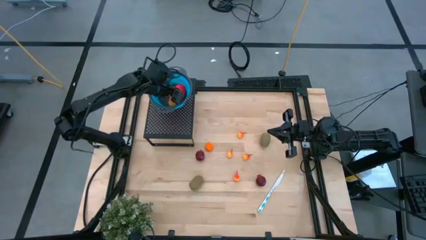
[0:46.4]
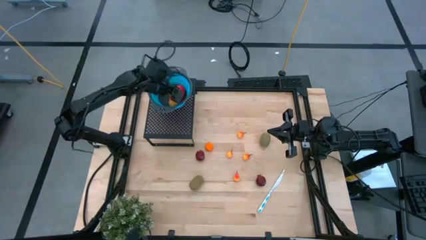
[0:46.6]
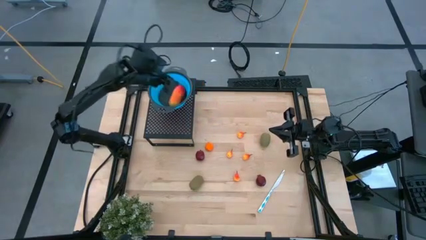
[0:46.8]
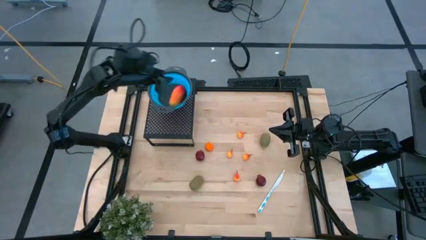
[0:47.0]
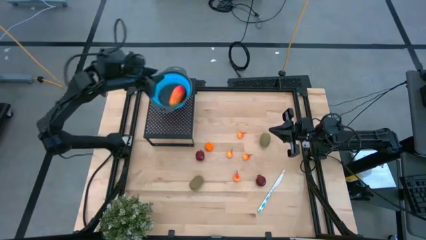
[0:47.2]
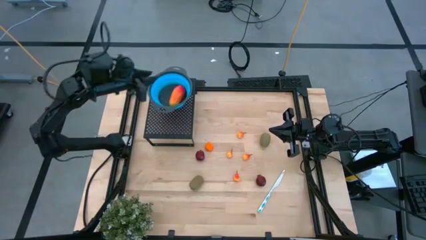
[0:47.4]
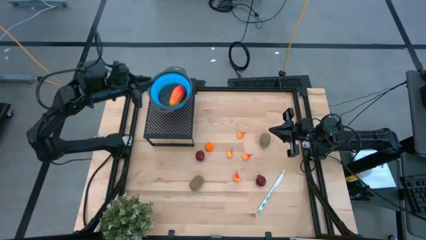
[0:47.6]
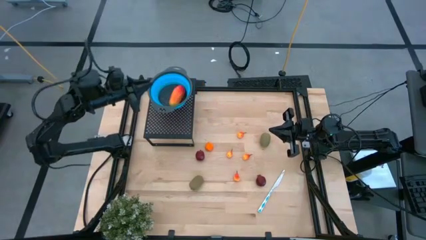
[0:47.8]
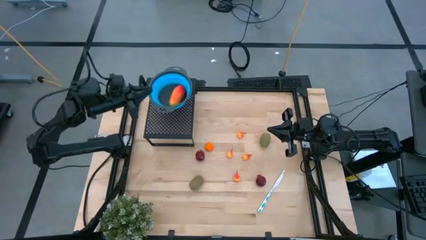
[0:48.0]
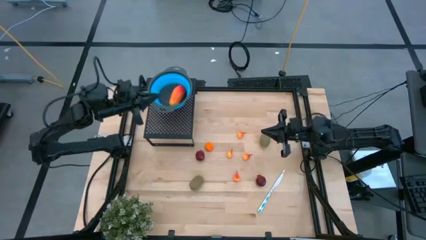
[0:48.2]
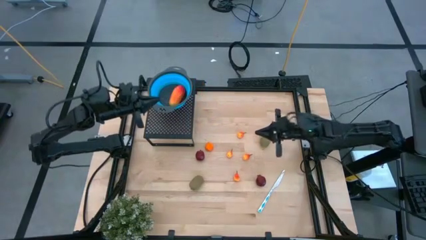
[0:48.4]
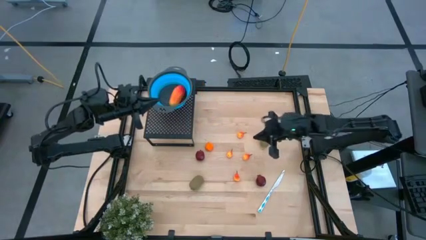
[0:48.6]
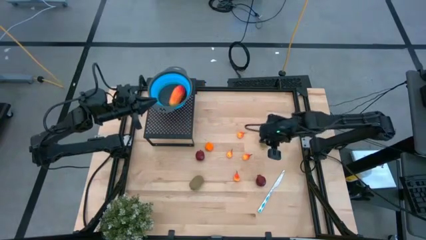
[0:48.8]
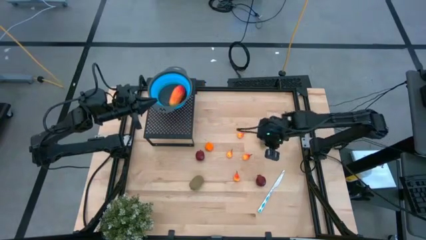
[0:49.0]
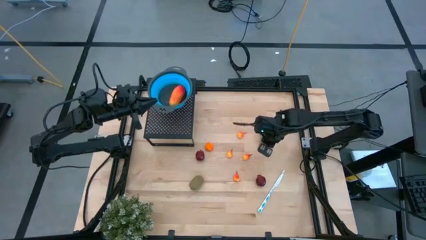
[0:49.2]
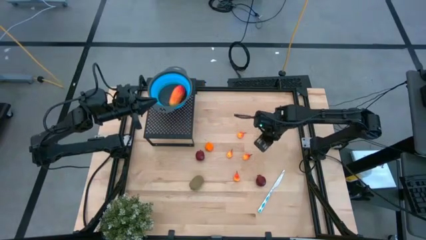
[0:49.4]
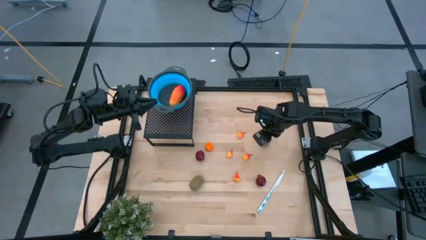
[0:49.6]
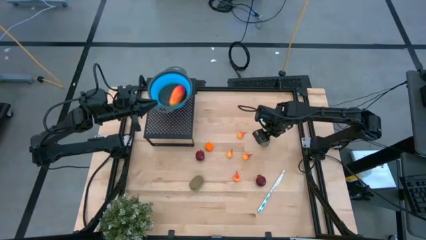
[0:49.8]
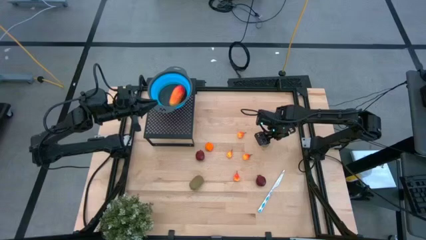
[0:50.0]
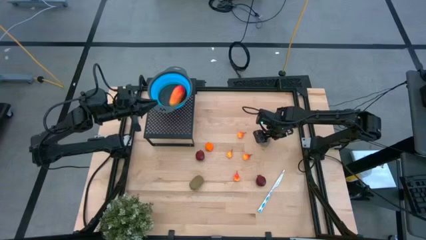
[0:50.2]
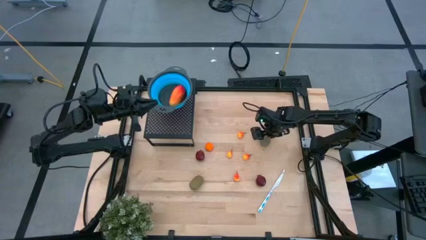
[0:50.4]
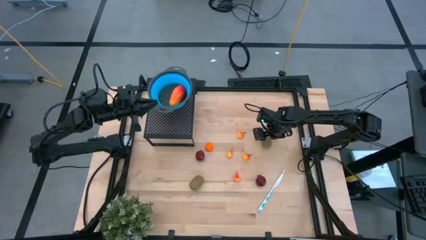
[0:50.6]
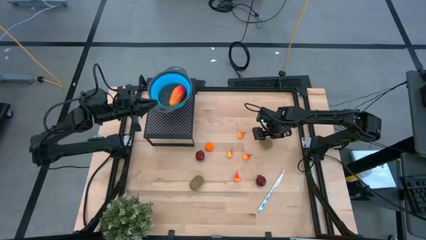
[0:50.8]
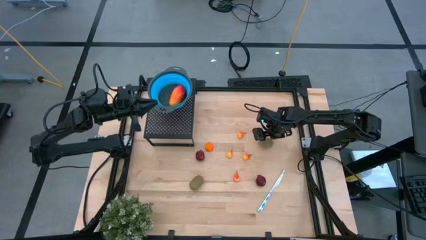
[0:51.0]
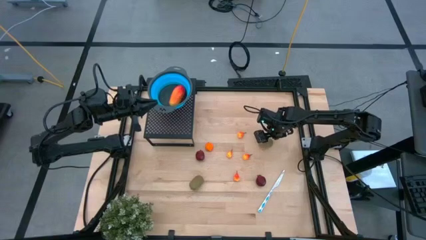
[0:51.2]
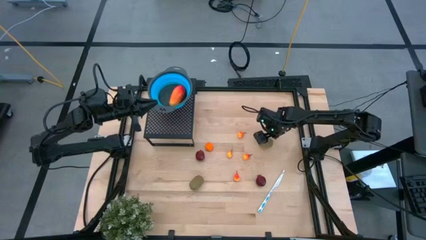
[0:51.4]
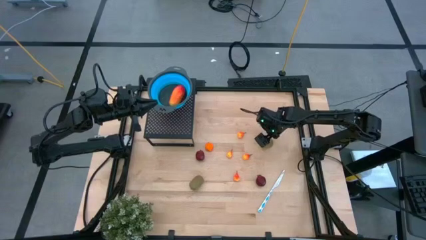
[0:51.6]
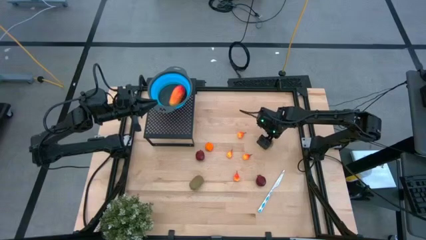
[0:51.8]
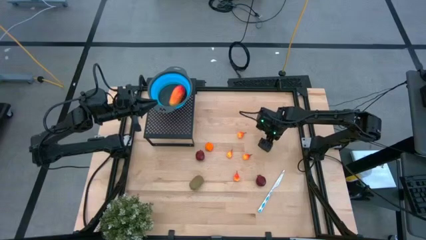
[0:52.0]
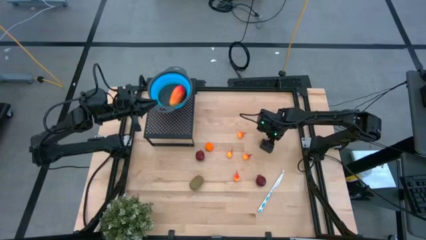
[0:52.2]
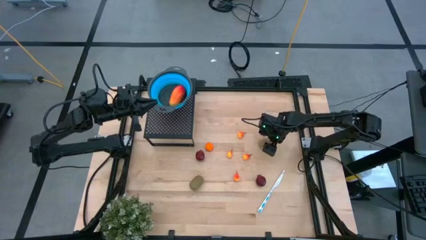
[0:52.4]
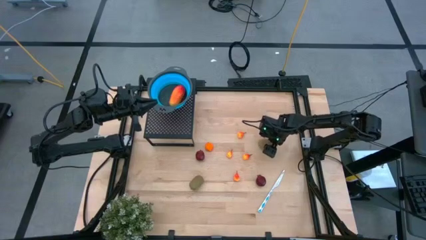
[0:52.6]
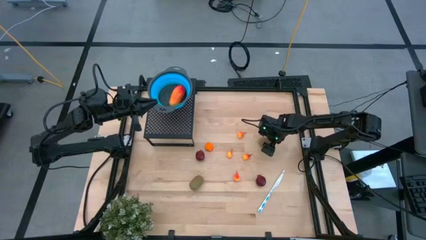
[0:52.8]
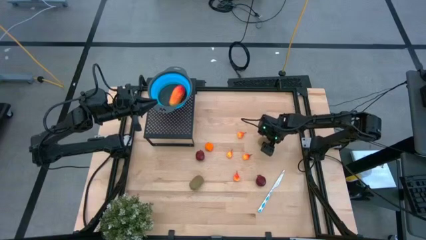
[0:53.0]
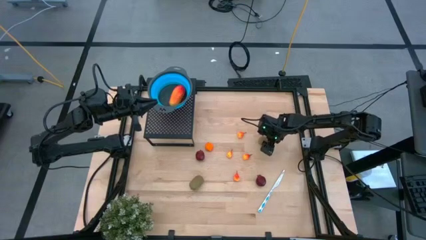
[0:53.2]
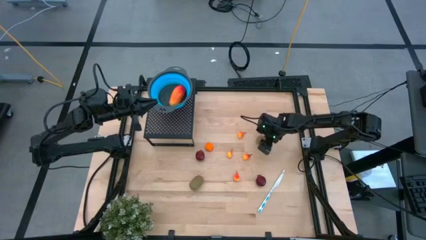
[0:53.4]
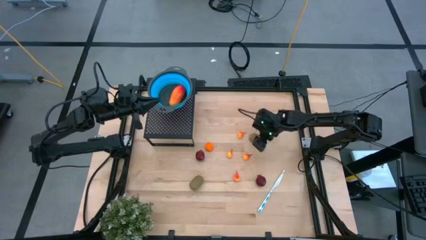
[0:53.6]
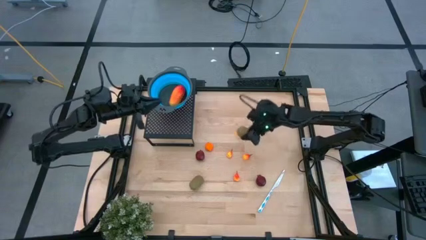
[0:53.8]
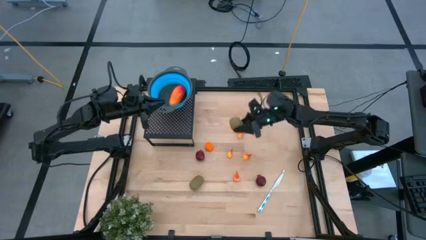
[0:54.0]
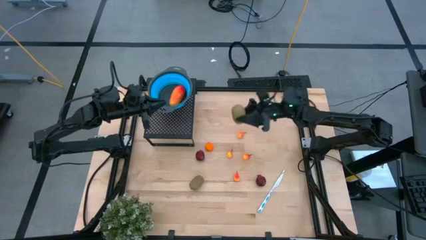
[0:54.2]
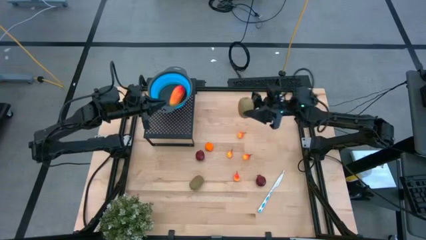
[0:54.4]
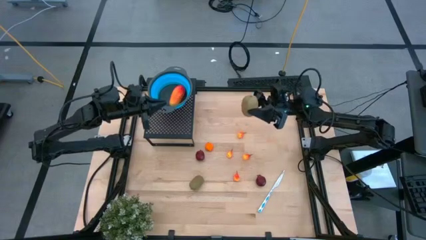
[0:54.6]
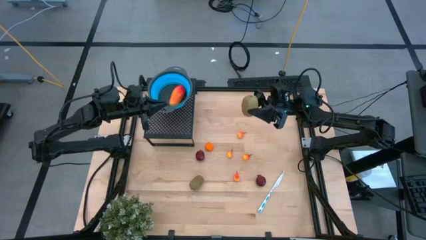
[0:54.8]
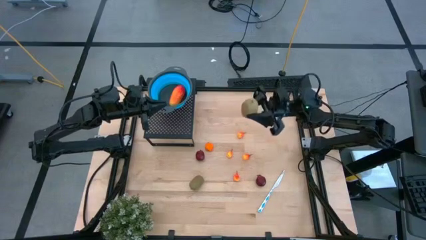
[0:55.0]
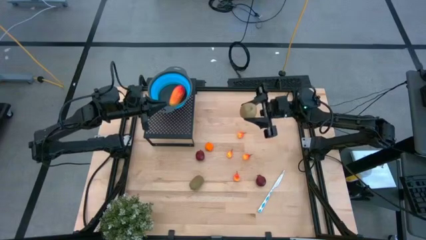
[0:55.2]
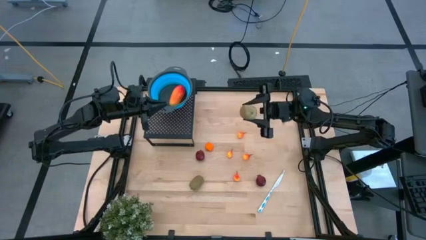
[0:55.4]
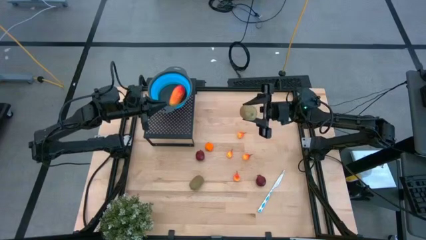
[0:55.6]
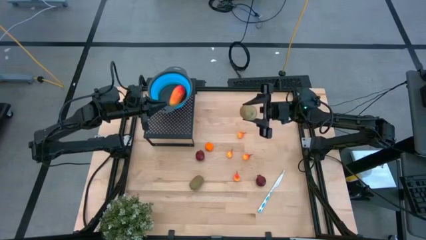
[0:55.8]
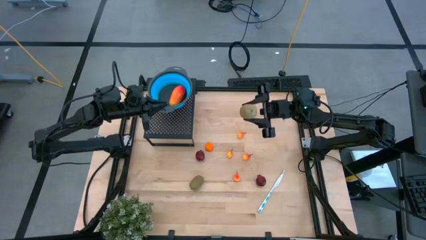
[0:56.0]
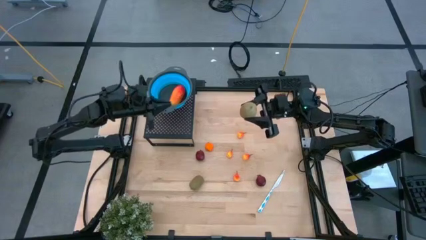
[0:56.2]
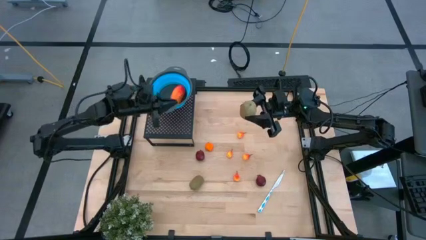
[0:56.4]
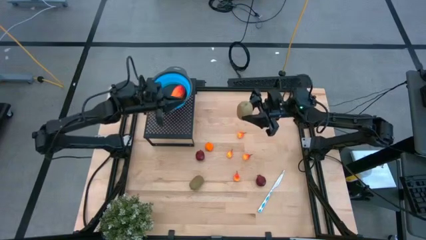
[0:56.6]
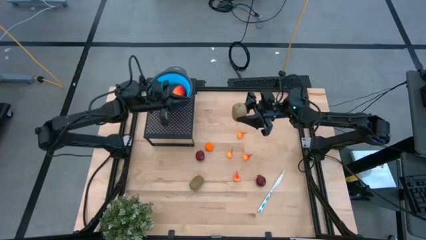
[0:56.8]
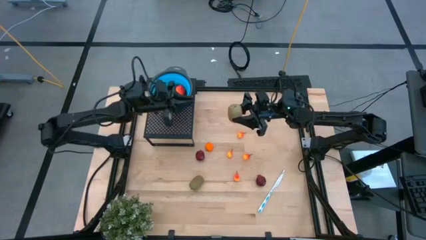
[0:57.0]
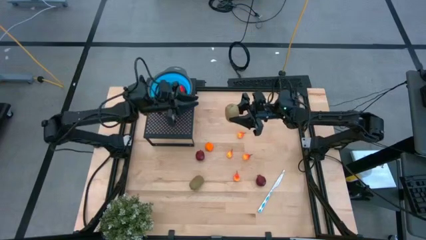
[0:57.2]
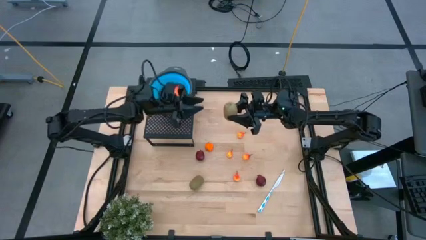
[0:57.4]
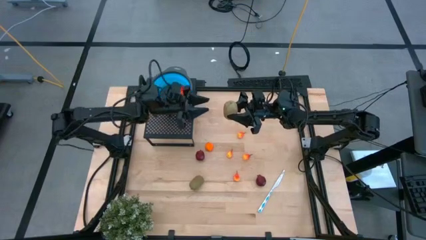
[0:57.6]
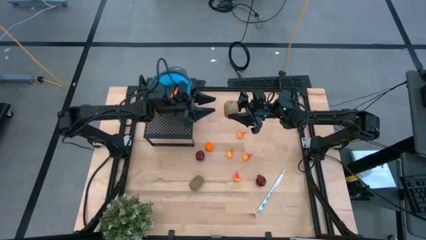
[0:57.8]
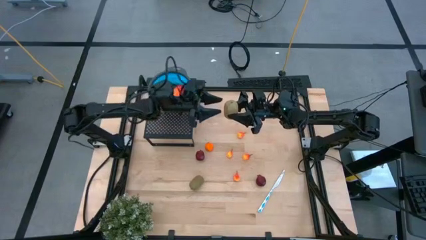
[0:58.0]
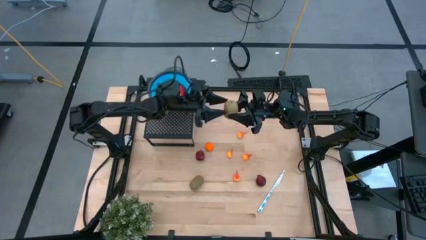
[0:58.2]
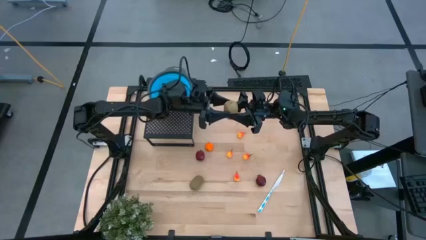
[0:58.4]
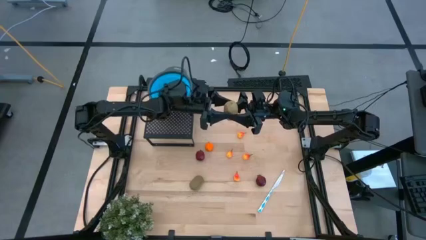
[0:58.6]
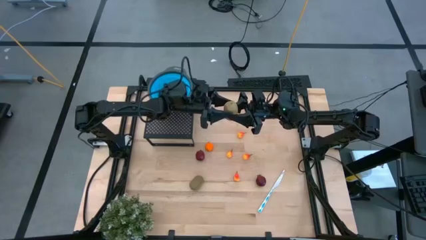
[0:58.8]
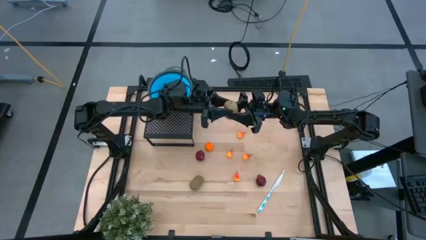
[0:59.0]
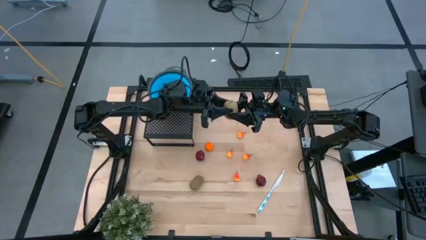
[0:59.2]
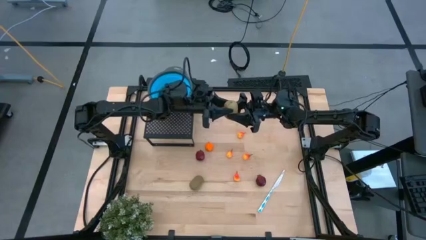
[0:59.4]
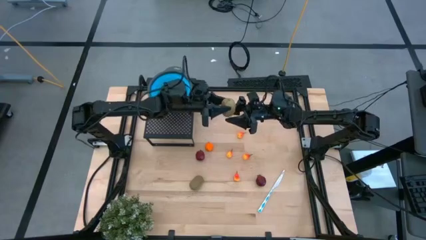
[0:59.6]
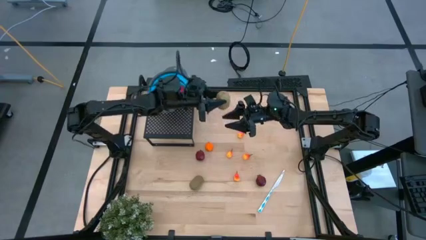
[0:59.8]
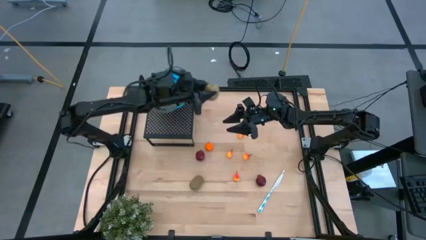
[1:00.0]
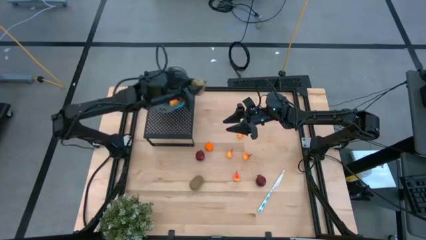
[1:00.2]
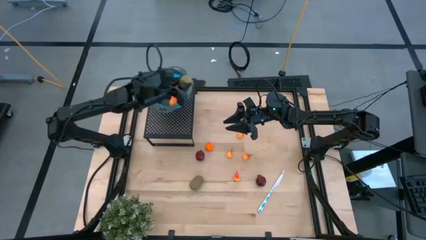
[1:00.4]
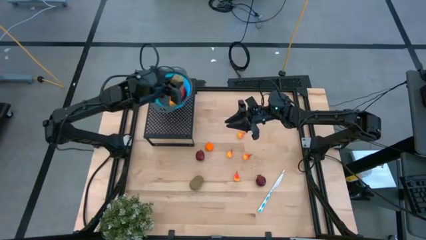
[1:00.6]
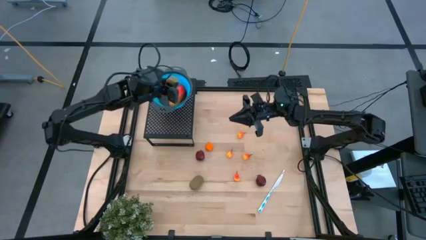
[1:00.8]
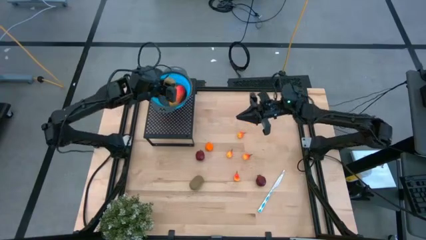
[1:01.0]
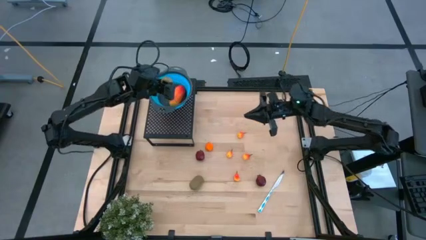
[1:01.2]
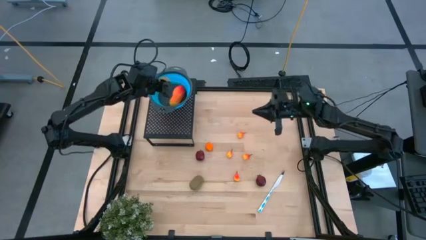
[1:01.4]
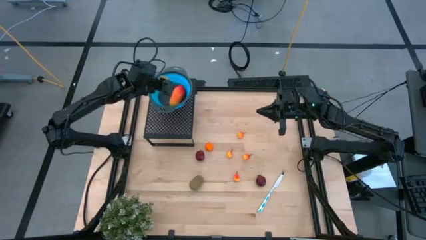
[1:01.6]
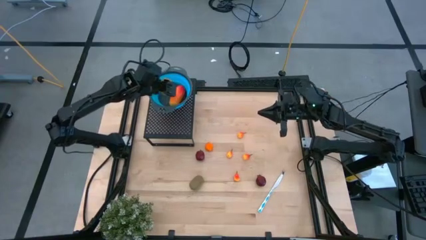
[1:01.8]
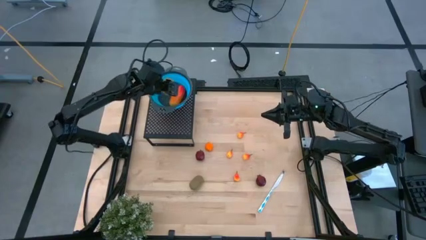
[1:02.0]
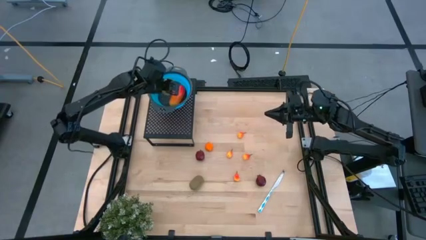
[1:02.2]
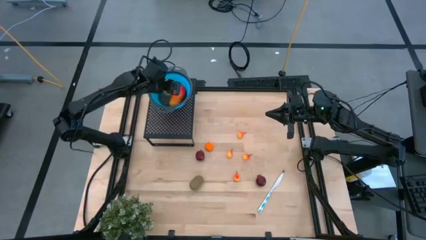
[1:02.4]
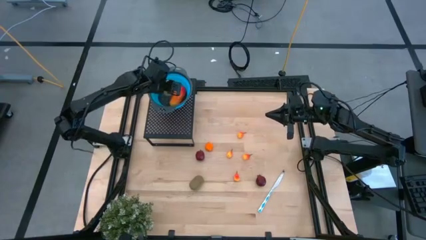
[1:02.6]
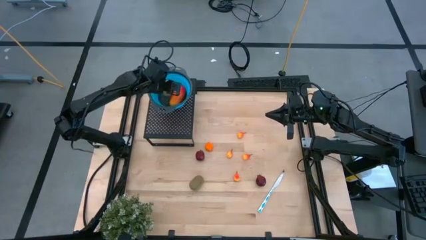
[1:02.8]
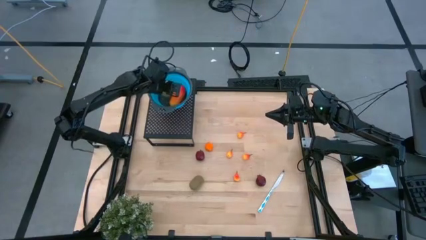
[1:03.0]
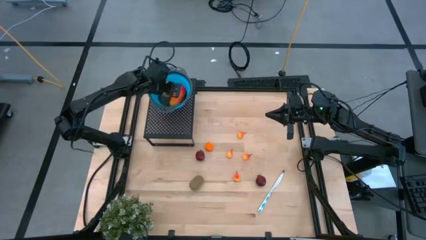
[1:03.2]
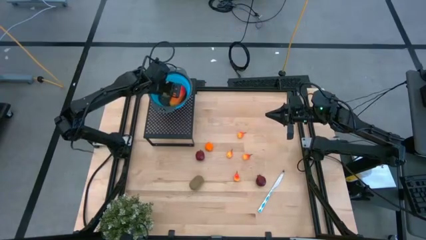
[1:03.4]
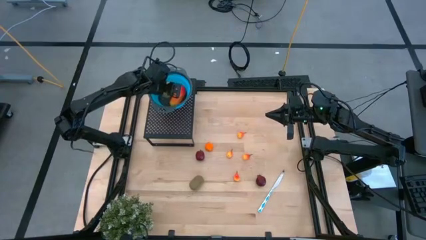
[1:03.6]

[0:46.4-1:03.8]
Task: Pick & Place Fruit
Put the top kiwi into the blue strainer bowl on the shelf
